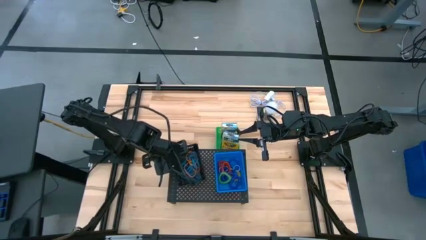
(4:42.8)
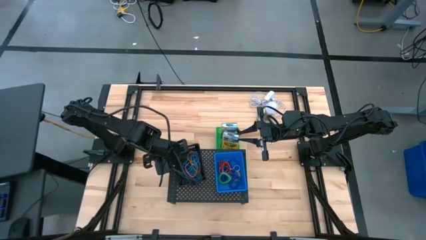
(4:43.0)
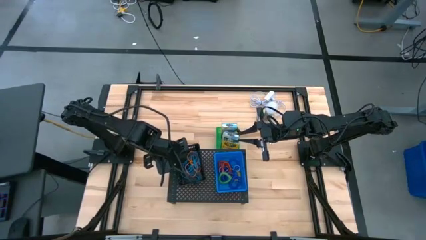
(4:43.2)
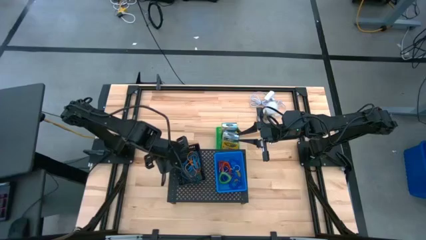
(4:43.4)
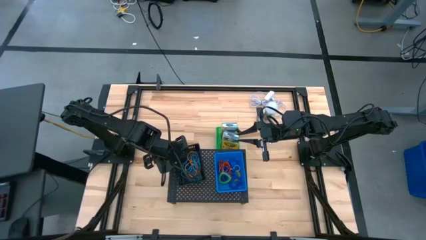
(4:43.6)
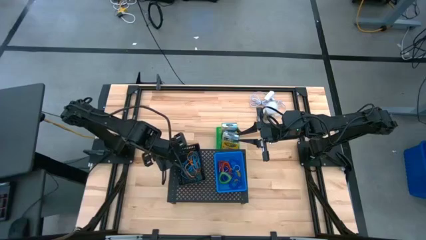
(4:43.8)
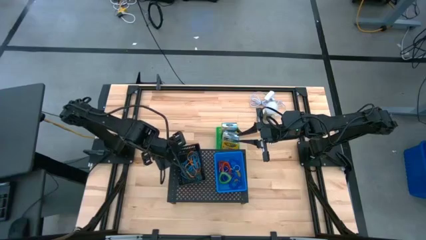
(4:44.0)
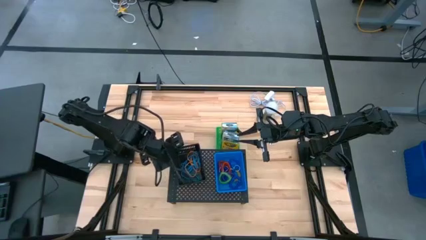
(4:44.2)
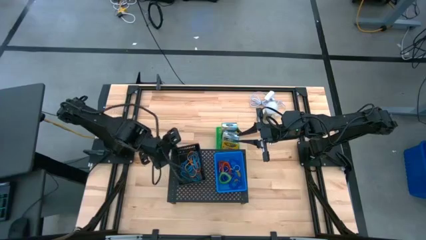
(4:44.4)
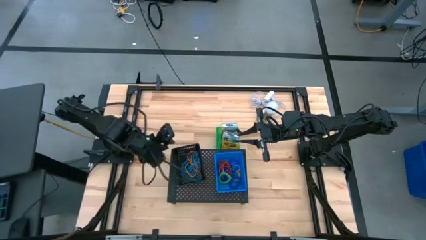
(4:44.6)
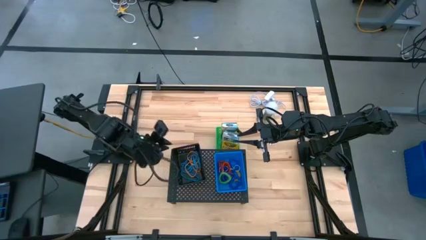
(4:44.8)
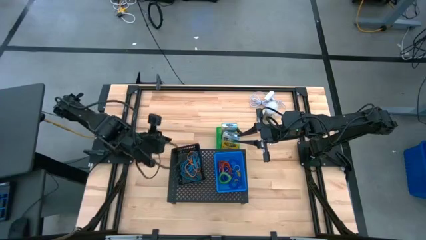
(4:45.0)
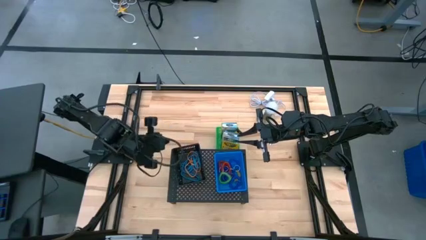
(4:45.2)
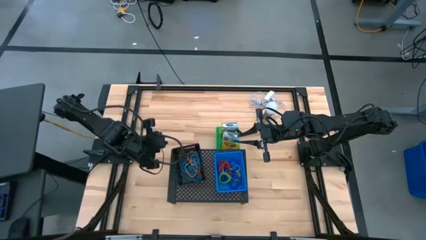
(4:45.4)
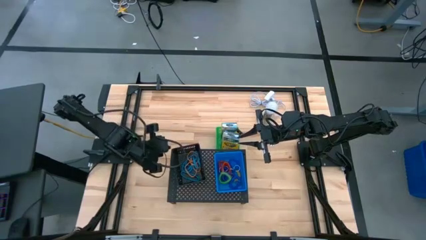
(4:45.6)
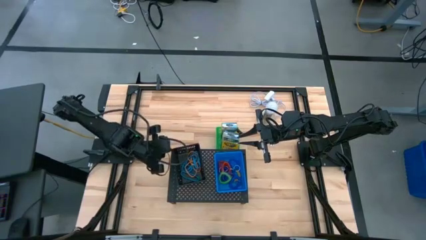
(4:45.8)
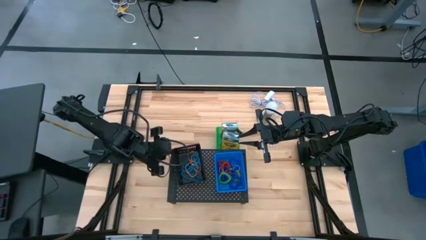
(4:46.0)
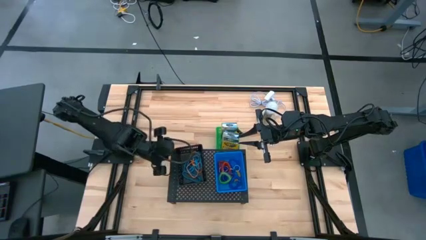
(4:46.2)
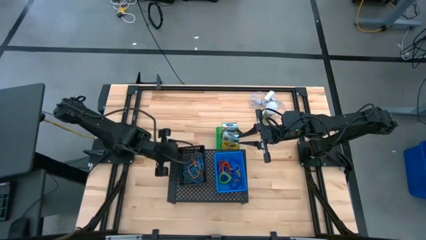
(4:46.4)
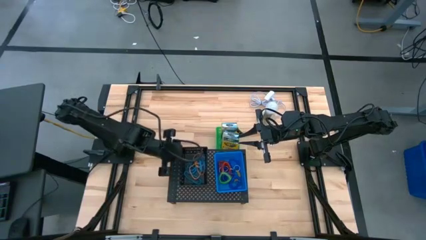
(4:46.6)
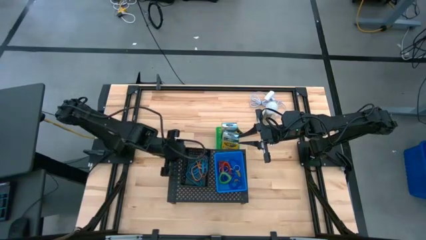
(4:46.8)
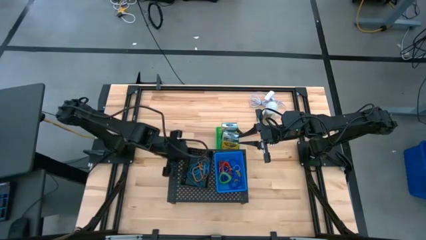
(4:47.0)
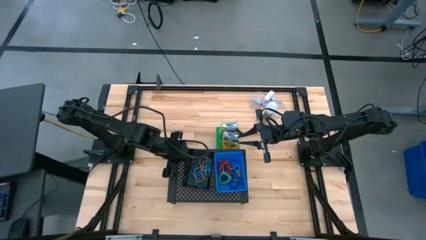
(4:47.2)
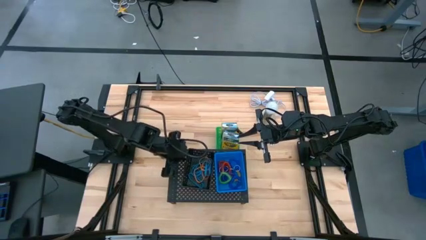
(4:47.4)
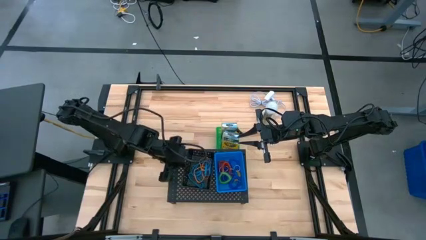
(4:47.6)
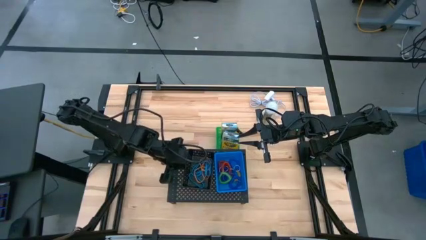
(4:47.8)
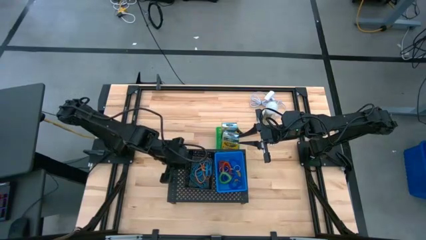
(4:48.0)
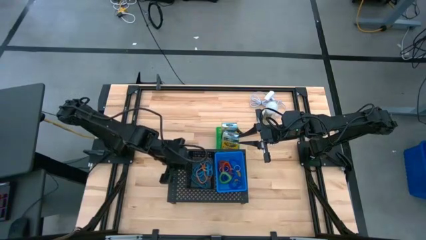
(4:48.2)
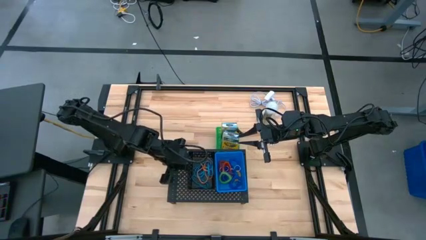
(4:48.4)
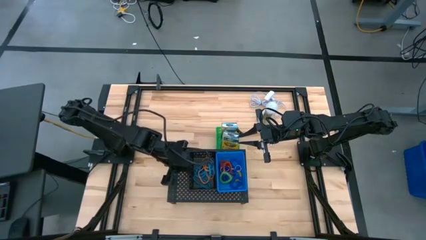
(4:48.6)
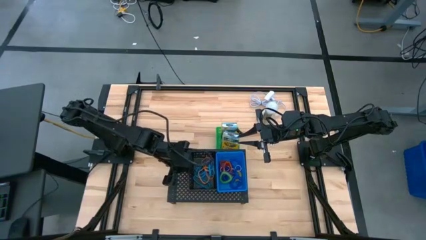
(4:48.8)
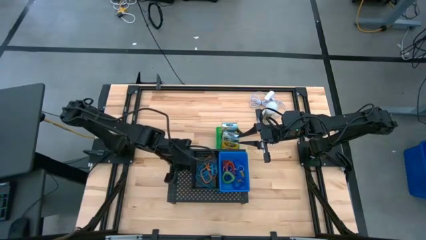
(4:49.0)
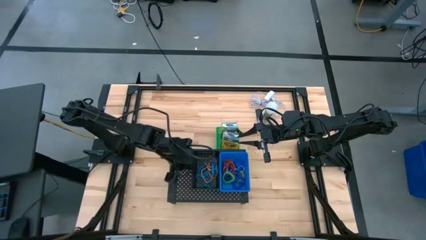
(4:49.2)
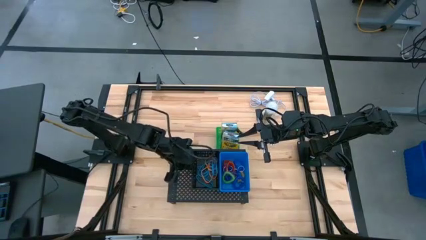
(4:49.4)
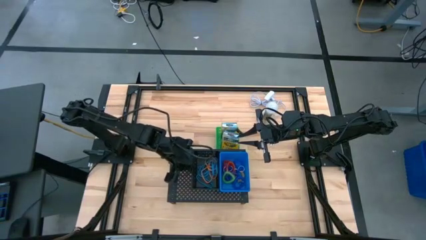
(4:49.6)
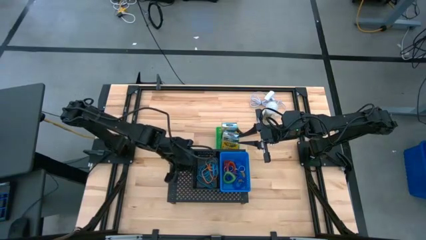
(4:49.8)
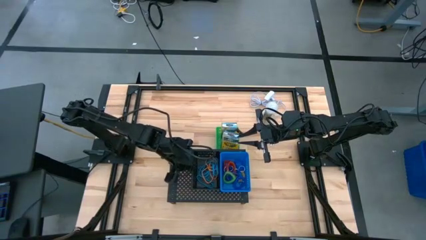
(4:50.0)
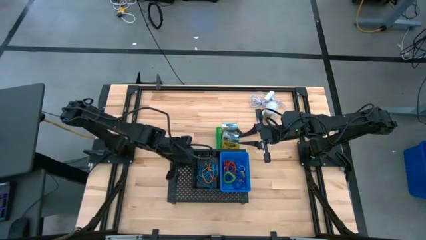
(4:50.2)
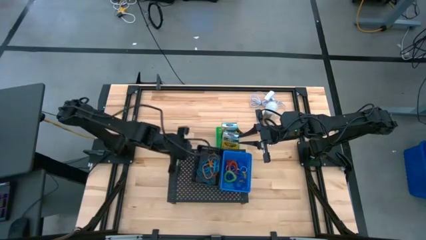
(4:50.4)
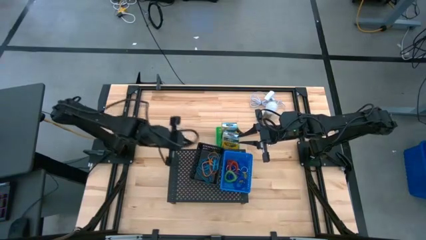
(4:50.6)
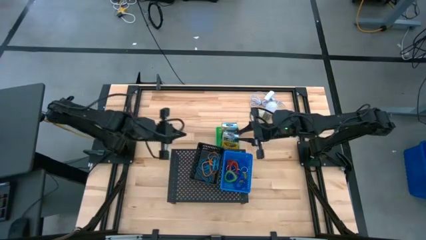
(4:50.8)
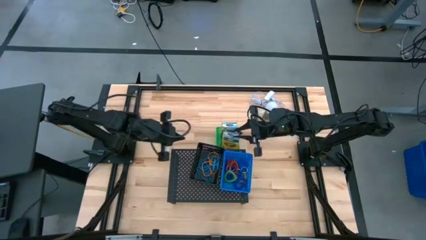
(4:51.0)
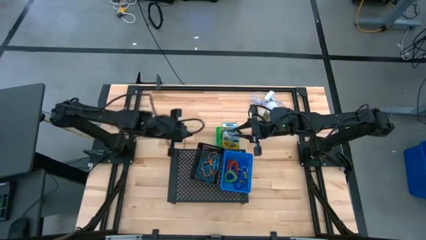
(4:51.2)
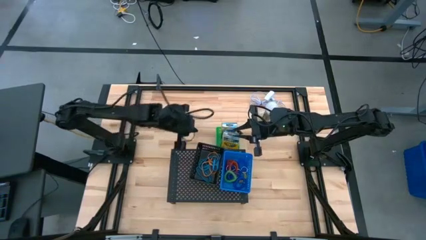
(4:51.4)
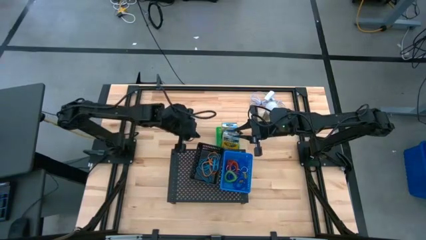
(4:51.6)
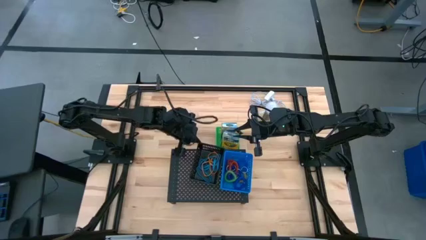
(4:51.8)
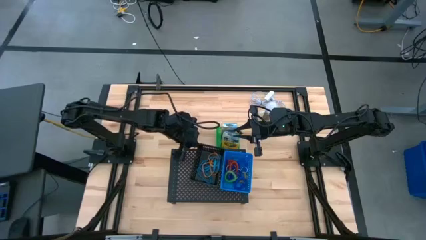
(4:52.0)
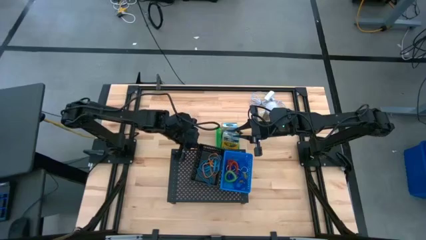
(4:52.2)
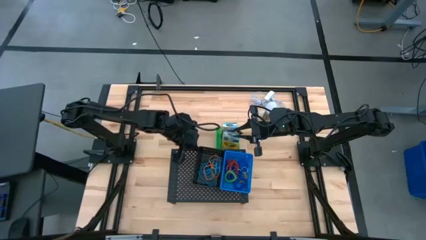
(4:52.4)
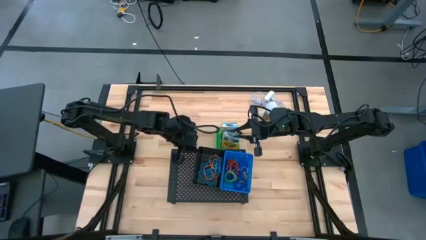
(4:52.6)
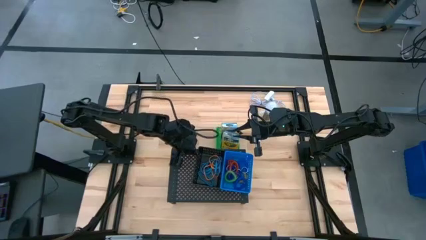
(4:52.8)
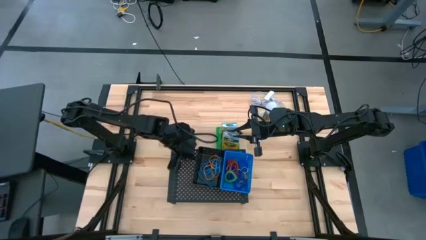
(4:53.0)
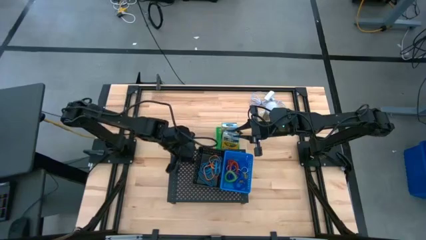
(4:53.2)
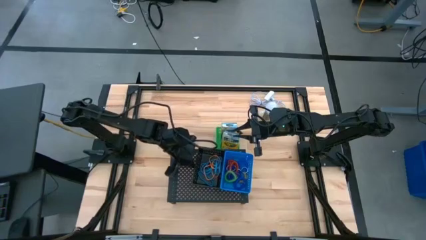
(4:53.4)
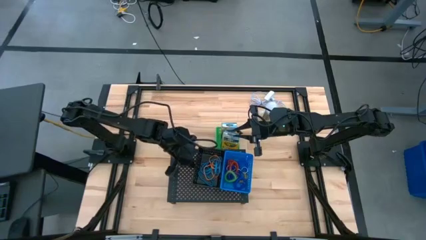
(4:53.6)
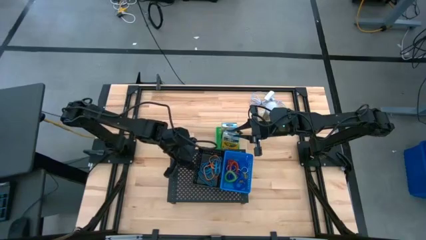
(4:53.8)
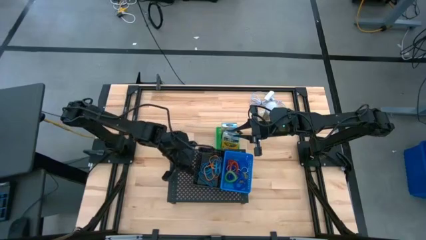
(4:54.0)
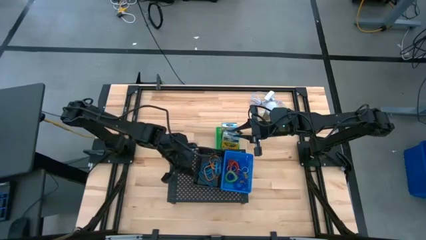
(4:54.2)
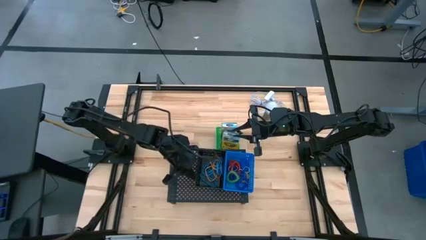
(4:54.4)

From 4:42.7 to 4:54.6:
Task: Pick & Place Office Desk Supplies
Put the black bin with the rubber bands on the shelf

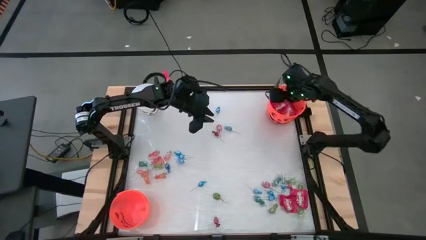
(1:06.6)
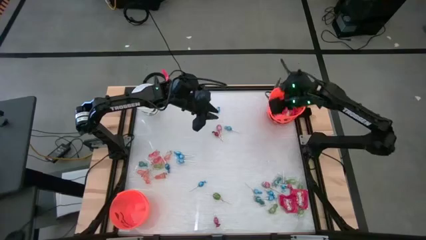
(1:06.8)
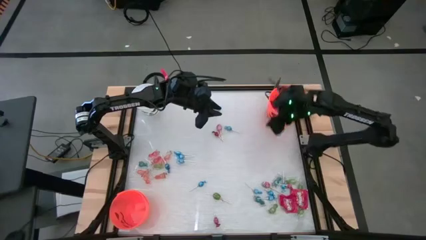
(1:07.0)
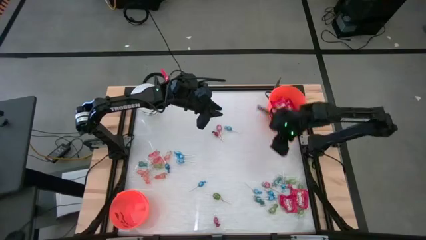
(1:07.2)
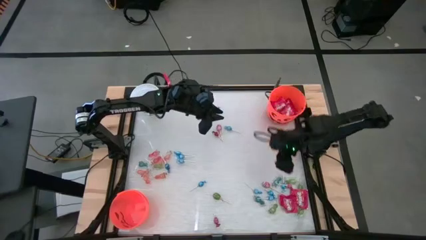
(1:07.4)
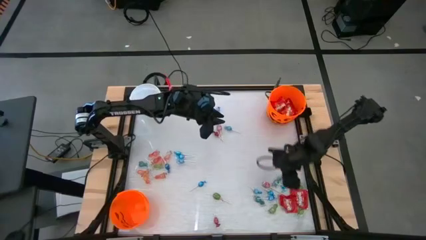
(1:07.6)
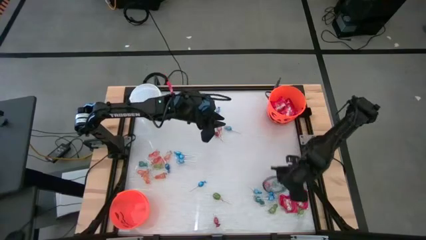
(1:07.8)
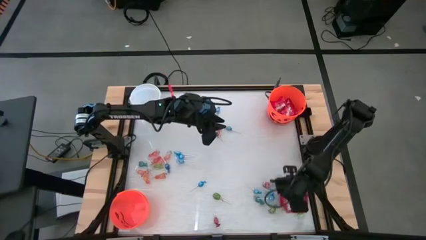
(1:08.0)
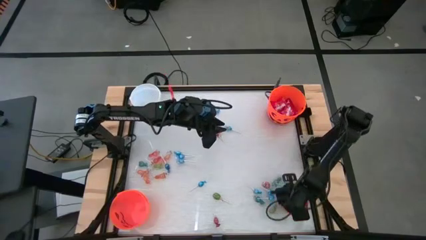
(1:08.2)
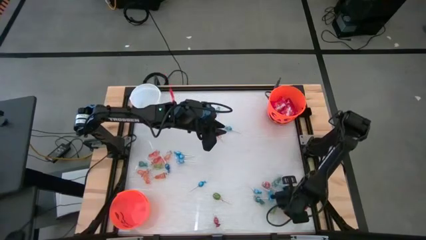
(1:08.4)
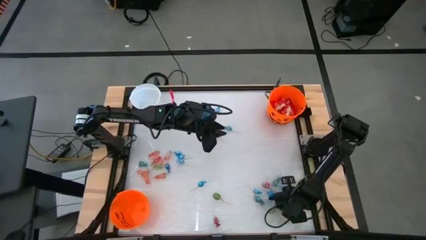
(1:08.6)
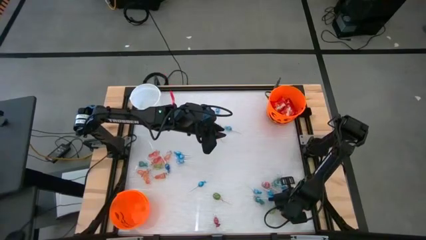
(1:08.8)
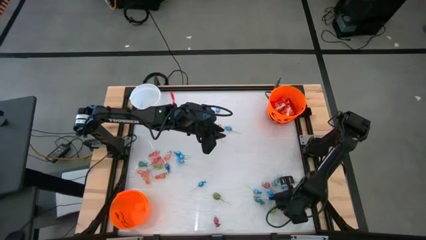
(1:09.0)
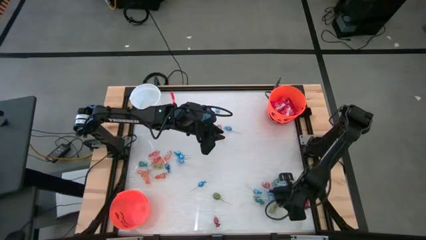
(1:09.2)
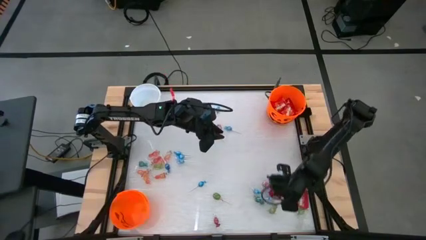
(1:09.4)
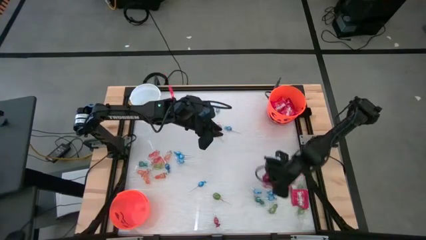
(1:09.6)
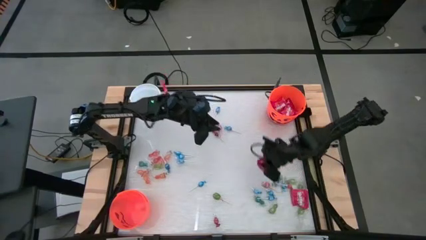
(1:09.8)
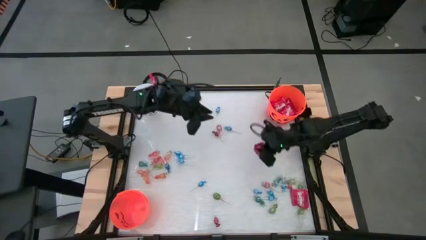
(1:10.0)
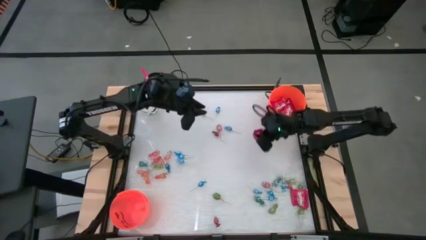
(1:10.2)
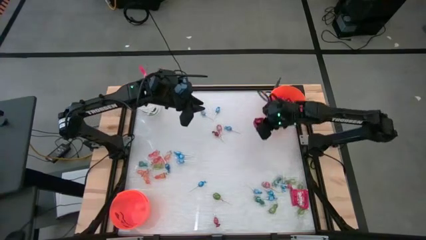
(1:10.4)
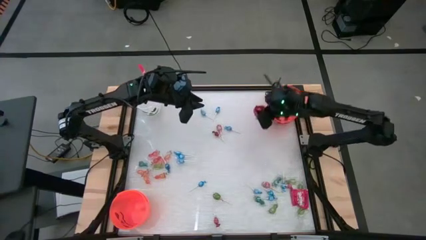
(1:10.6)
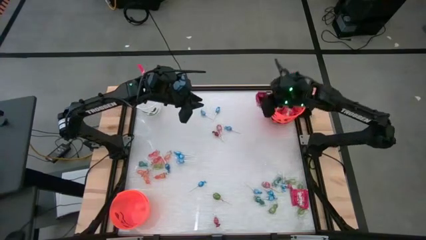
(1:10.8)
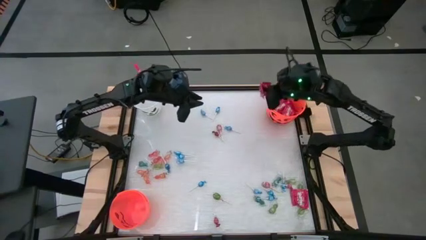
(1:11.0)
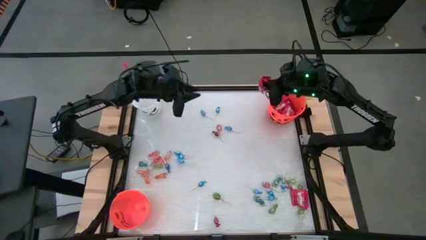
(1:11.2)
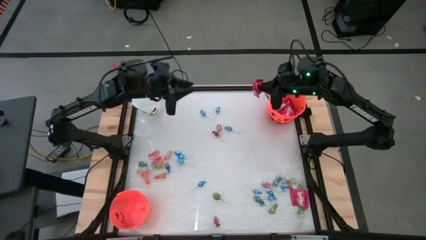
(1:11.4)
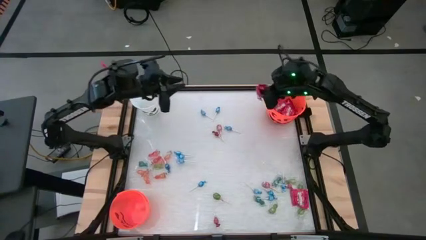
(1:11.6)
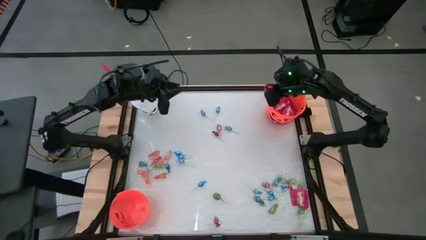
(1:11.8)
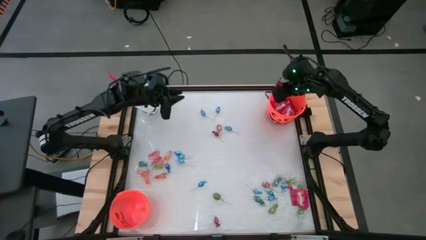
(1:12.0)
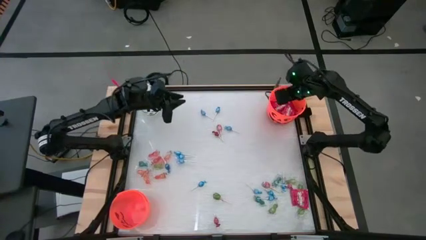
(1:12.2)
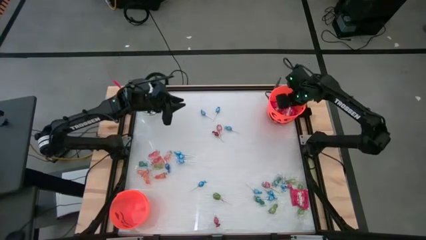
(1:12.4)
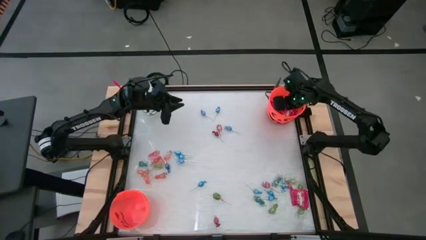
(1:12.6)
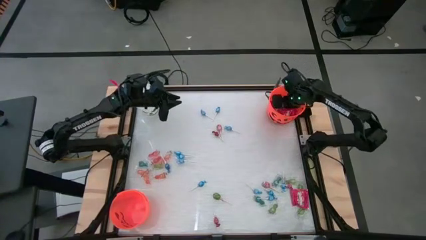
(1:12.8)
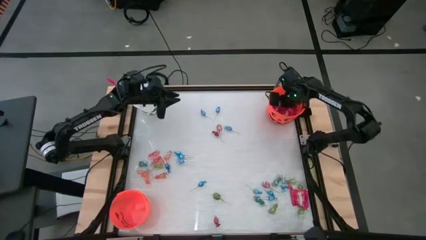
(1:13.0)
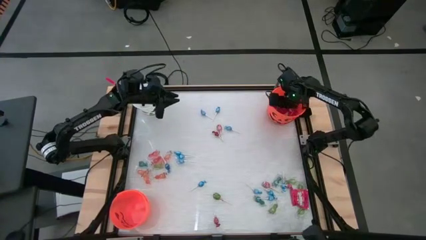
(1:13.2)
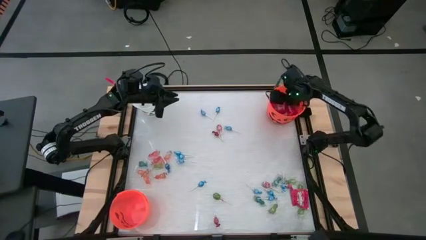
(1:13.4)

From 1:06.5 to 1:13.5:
Task: Sort candy by brand, put in halloween buckets
Put the red candy into the top orange bucket
